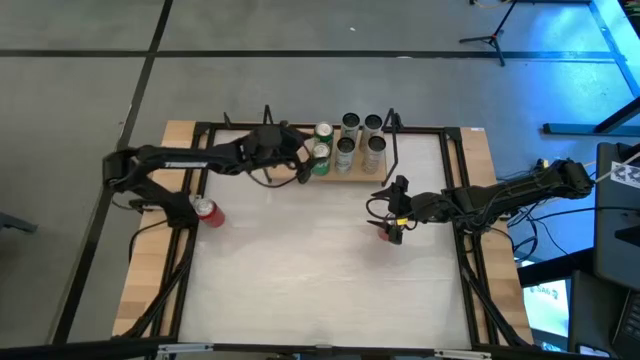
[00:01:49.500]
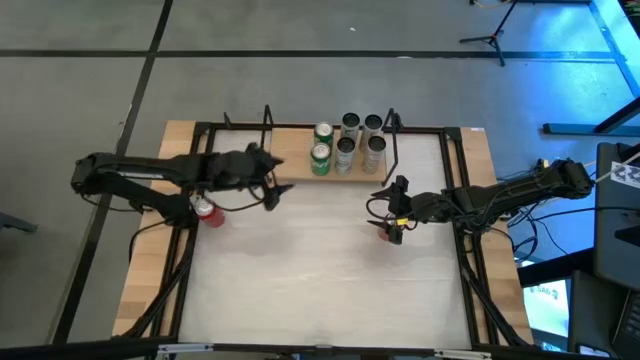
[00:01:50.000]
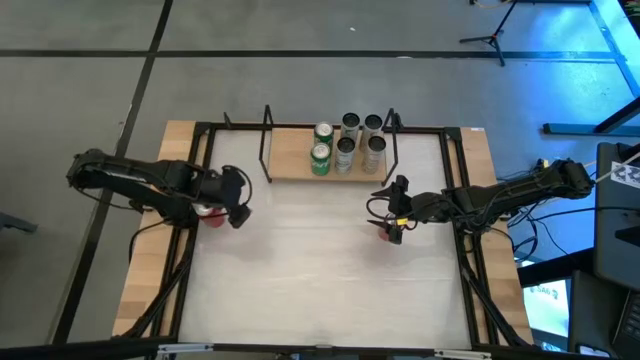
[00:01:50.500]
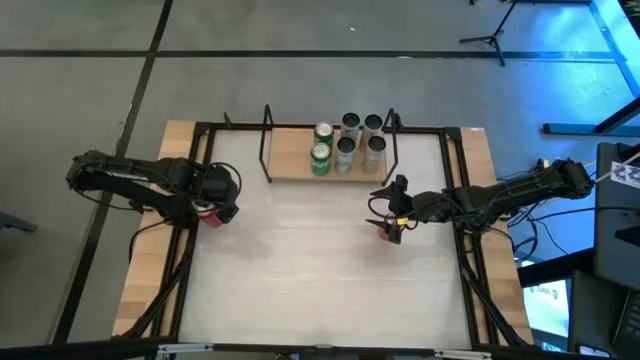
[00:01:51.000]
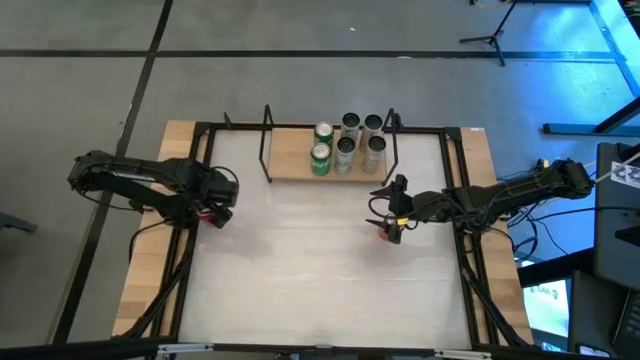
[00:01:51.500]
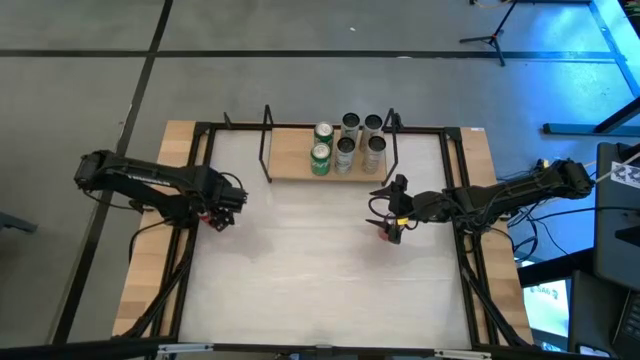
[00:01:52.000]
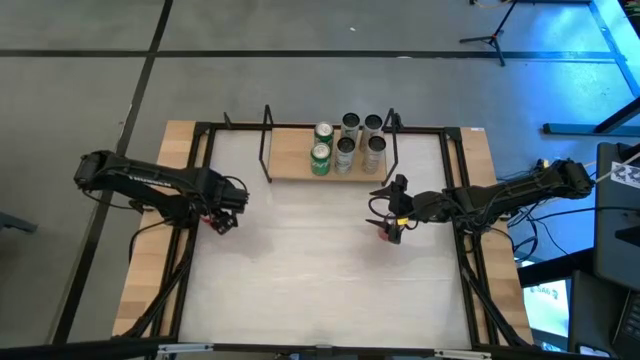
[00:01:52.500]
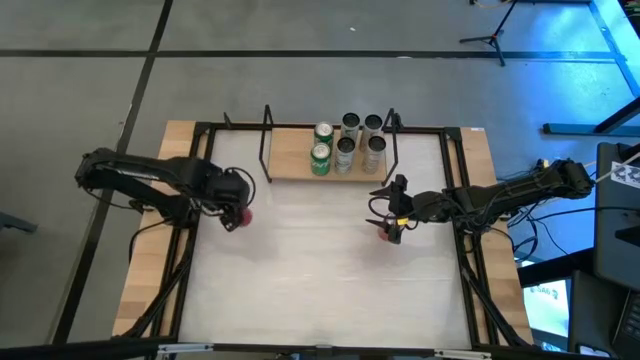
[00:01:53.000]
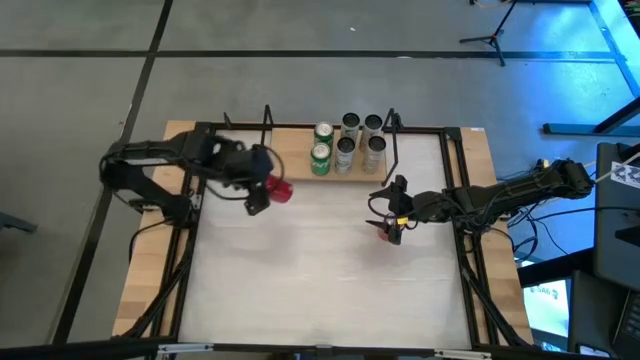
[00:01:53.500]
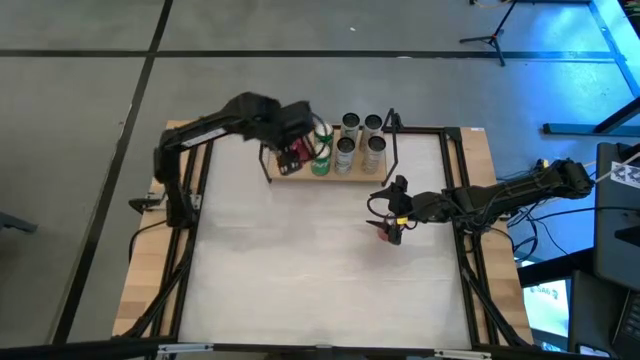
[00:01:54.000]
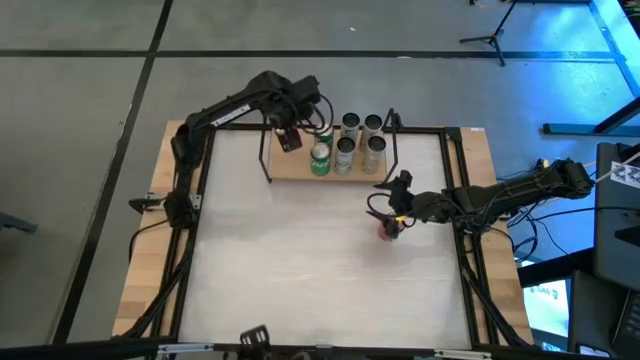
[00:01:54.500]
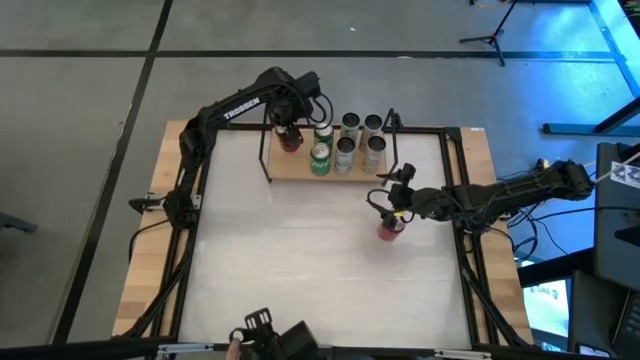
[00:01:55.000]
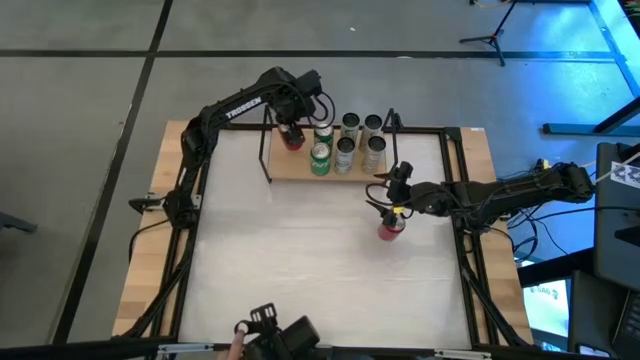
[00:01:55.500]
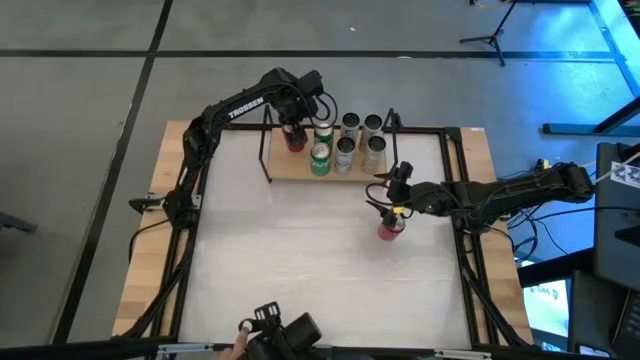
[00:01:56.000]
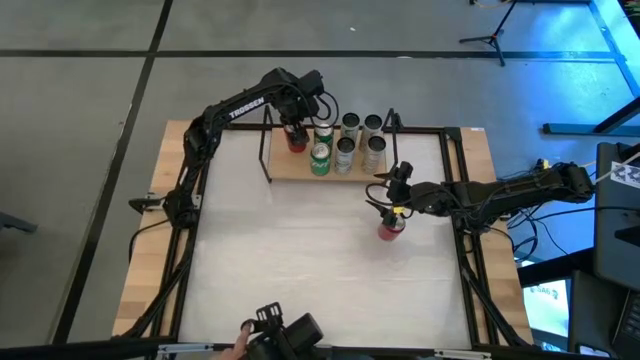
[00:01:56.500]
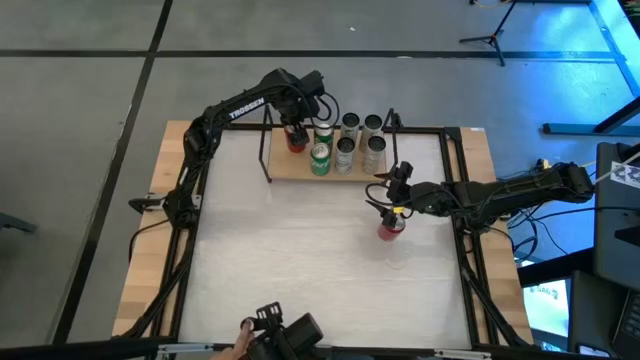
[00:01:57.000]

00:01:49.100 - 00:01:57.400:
Task: Place canned beverage on shelf
Put the left red and black soda can on the shelf

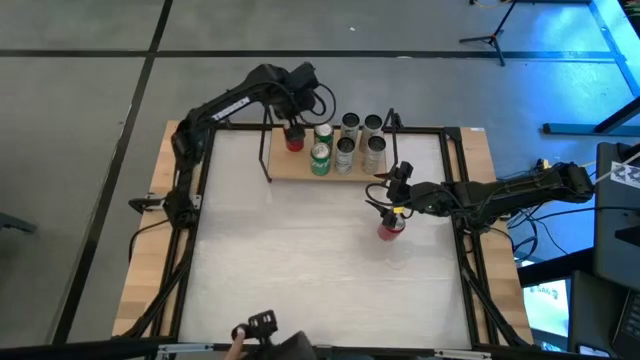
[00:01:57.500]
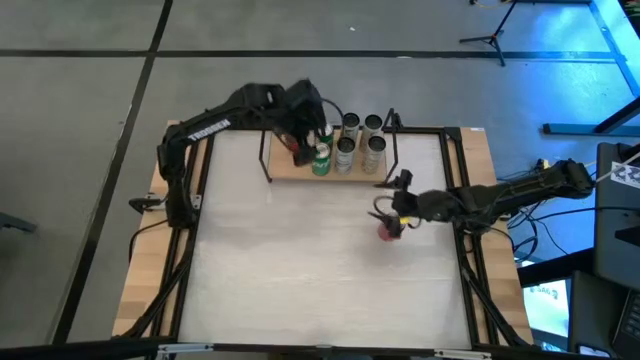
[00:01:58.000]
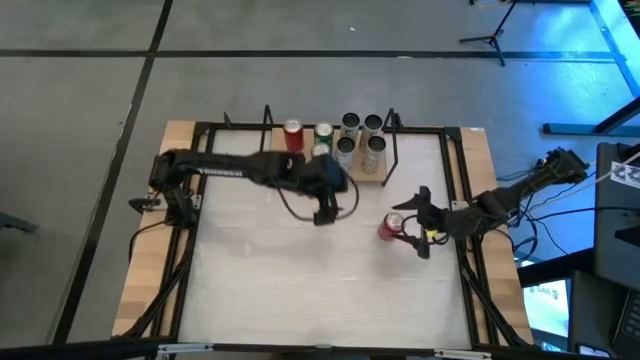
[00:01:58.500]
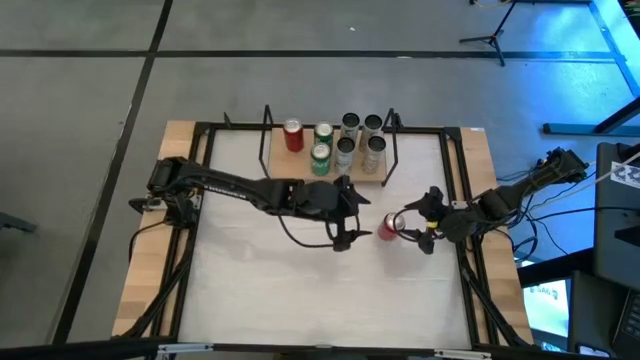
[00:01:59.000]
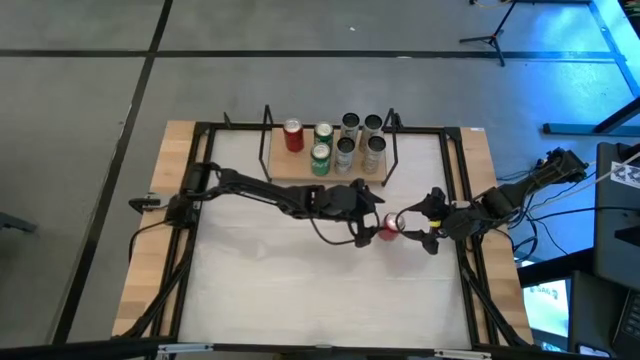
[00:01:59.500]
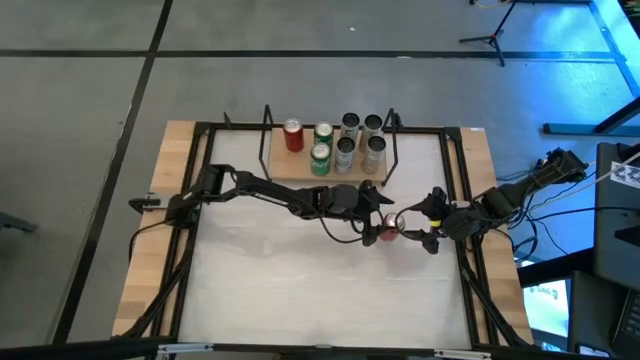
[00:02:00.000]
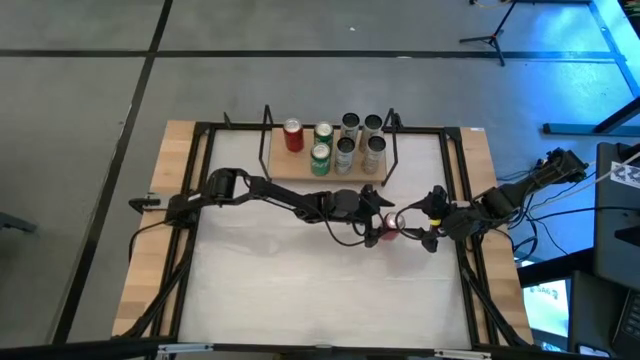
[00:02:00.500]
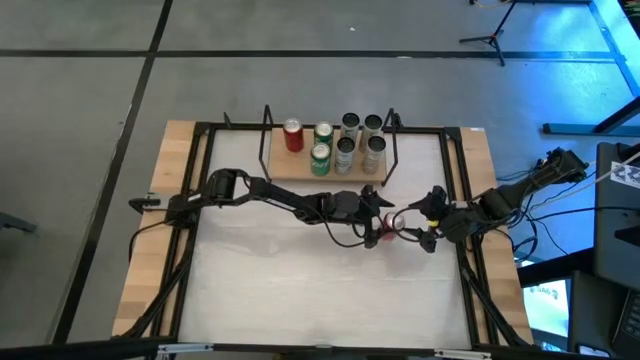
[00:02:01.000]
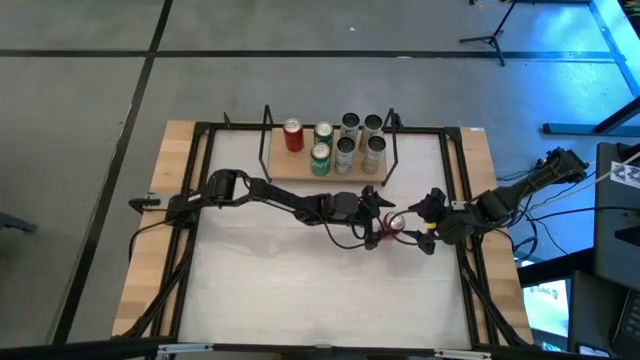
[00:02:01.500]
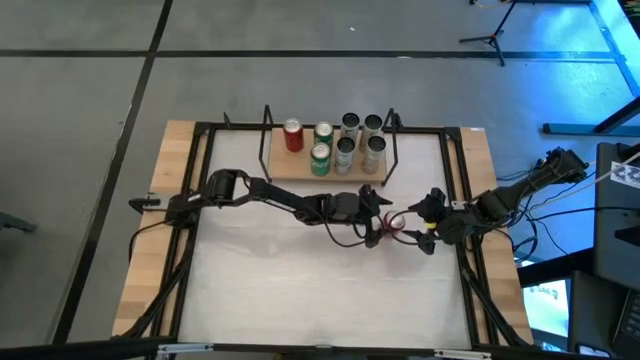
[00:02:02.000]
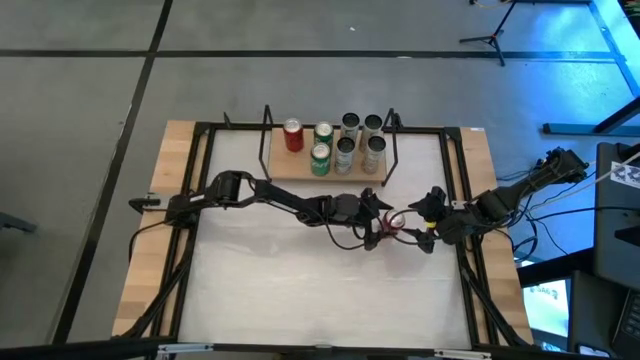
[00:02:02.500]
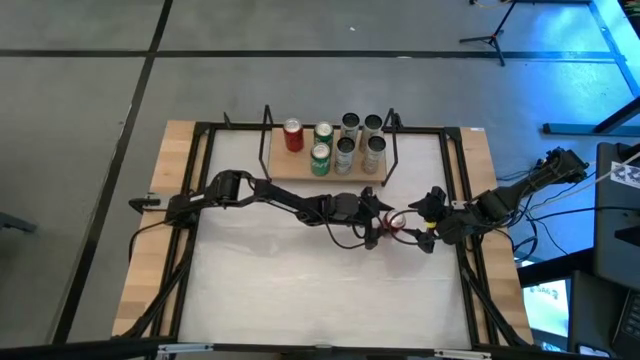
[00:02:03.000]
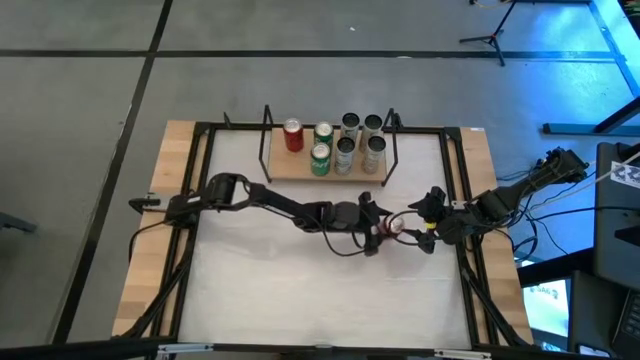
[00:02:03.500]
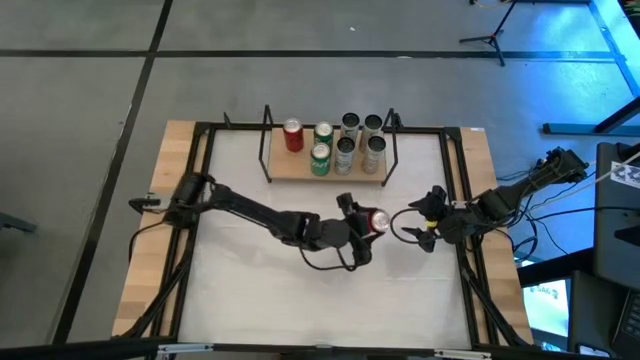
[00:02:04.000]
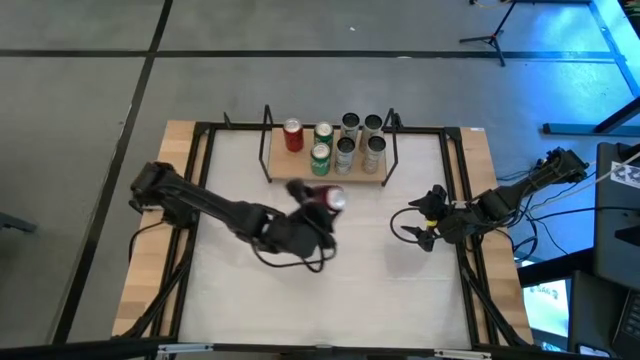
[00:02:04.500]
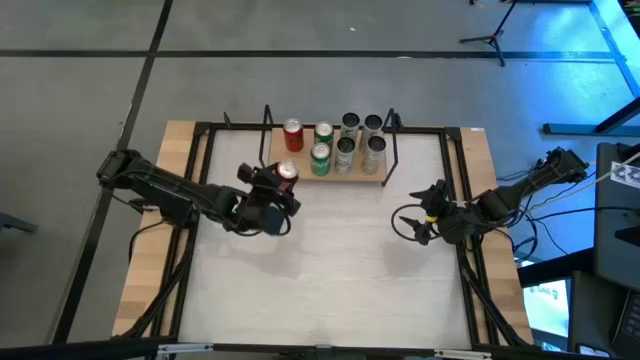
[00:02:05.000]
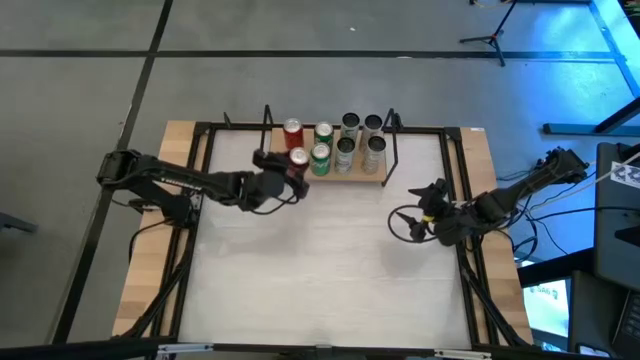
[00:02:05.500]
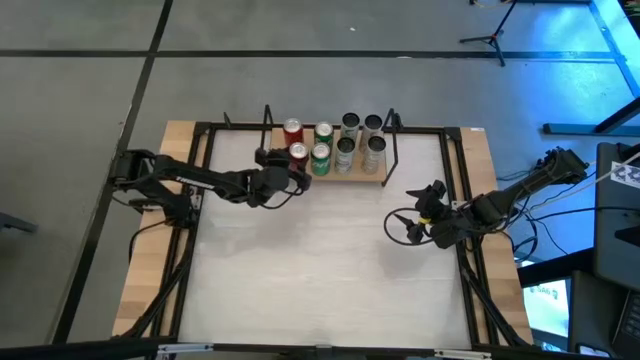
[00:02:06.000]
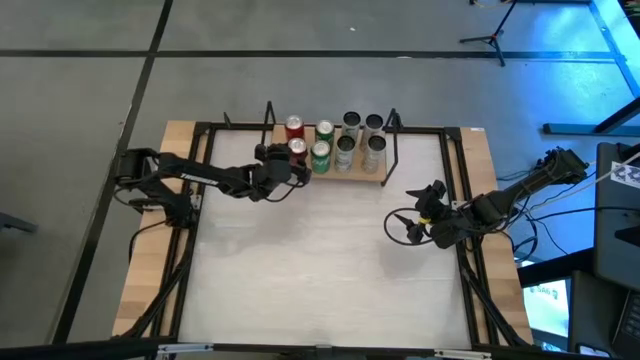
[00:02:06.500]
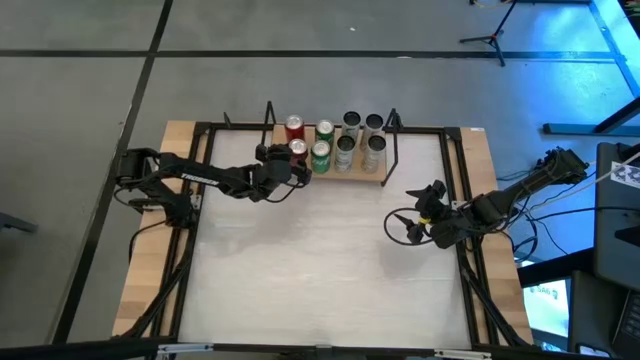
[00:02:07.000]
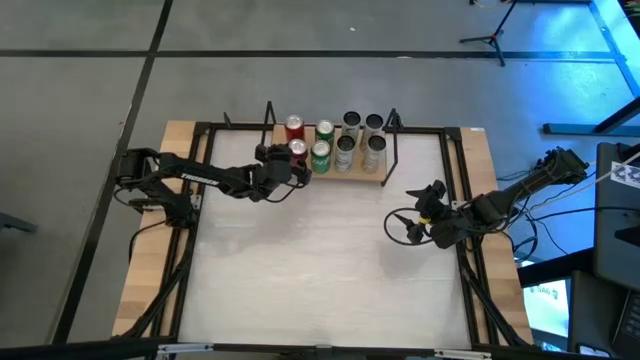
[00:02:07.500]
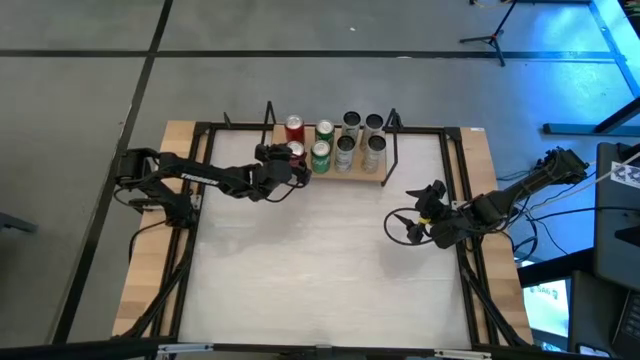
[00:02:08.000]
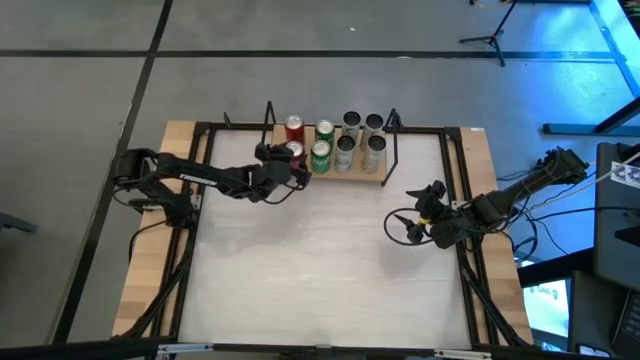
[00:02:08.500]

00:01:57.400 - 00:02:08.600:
Put the red and black soda can on the shelf
